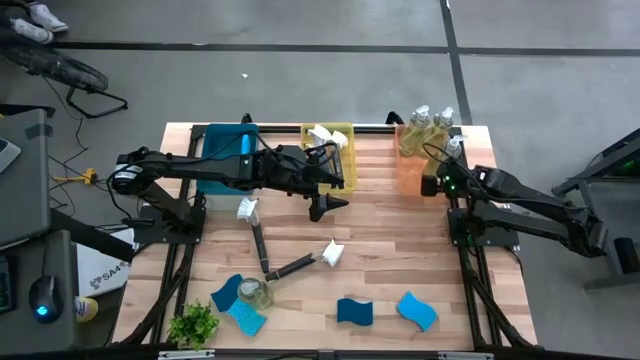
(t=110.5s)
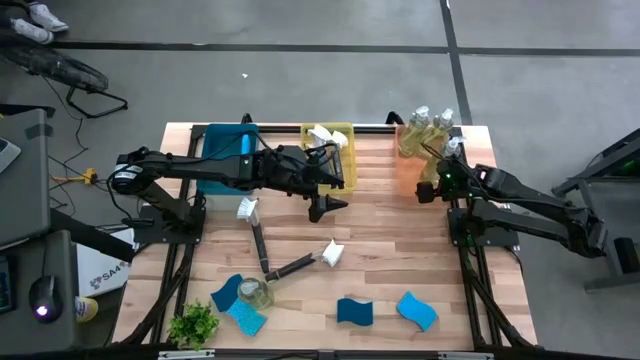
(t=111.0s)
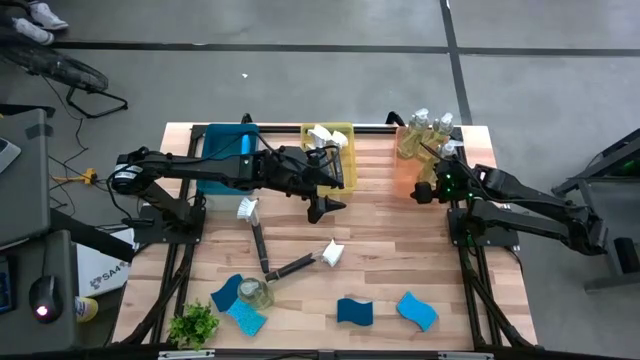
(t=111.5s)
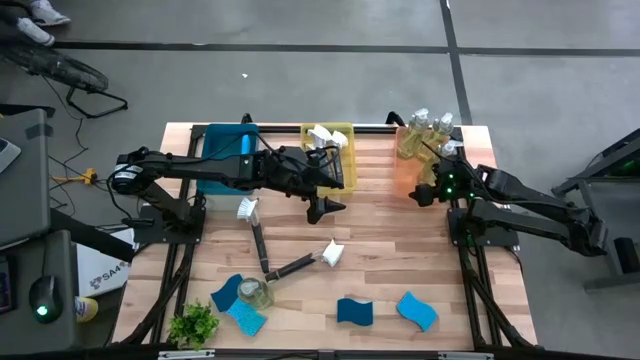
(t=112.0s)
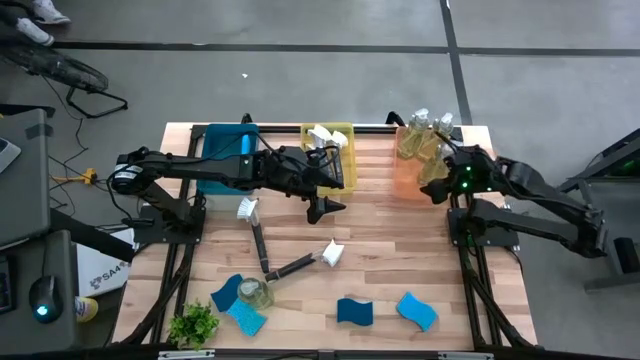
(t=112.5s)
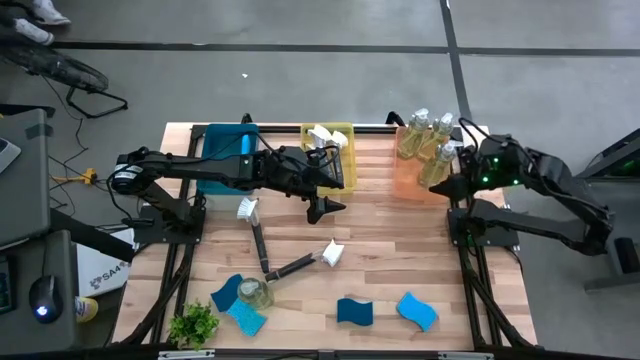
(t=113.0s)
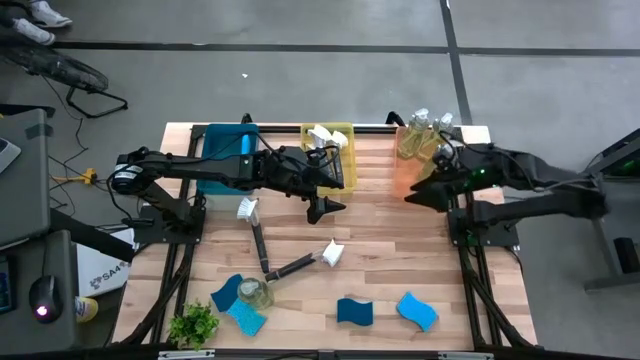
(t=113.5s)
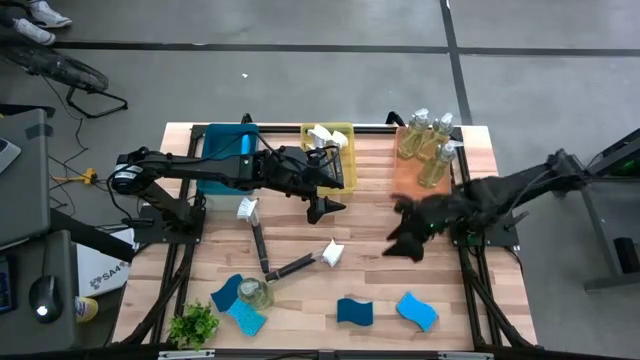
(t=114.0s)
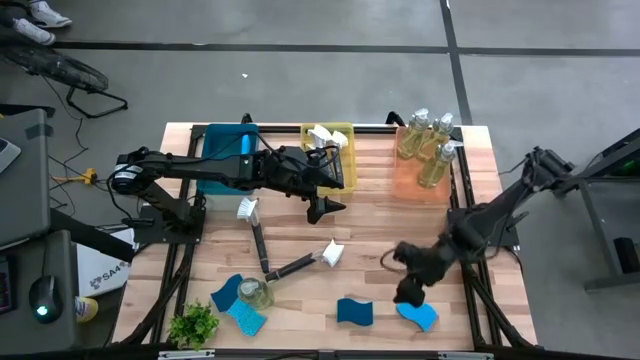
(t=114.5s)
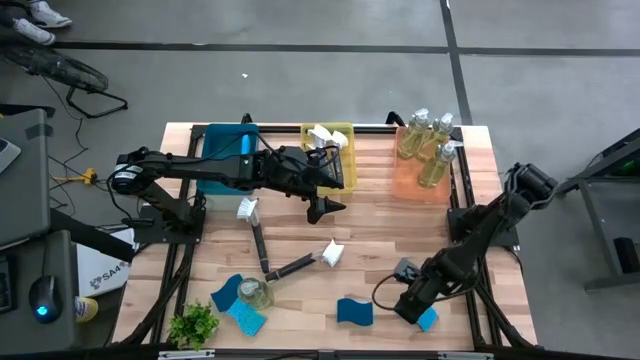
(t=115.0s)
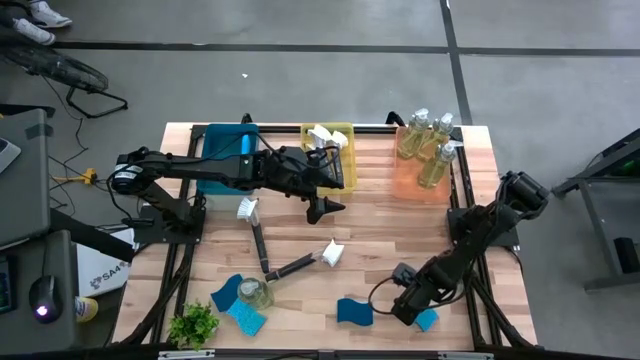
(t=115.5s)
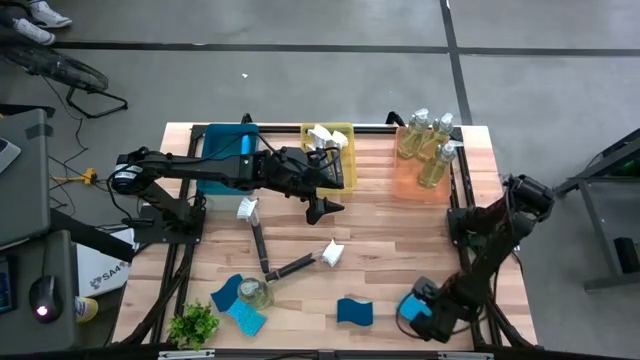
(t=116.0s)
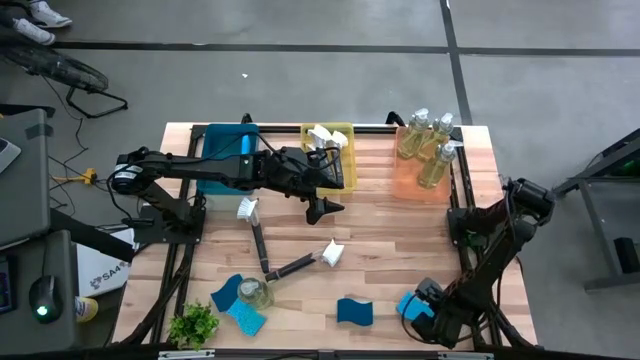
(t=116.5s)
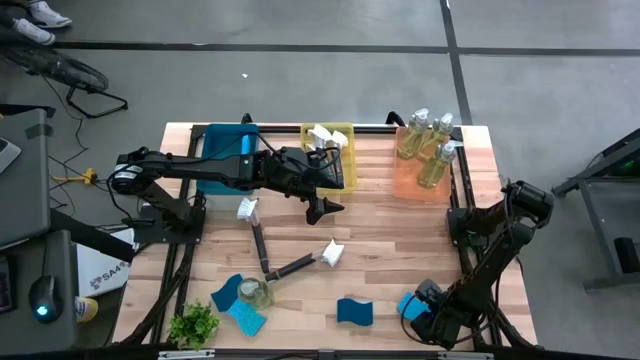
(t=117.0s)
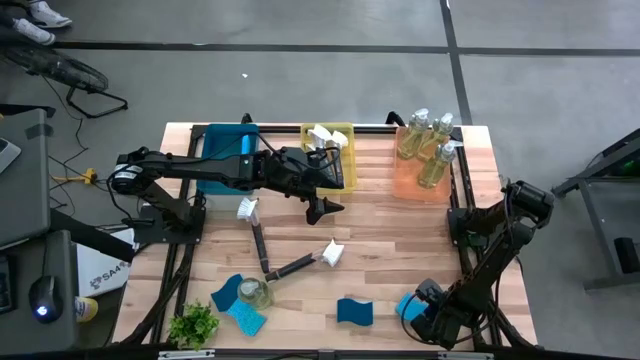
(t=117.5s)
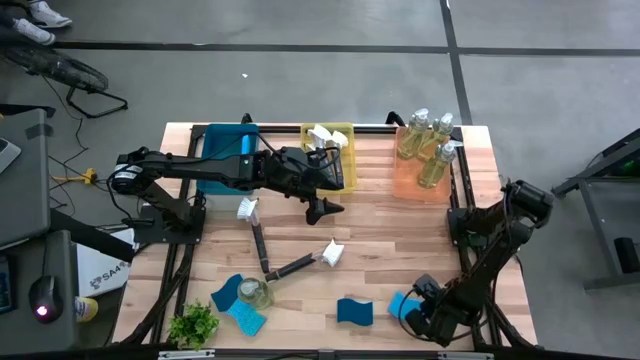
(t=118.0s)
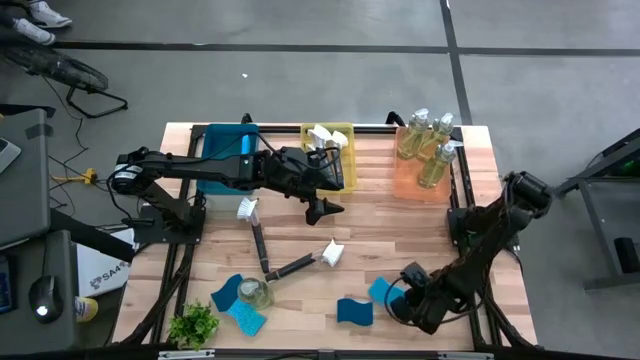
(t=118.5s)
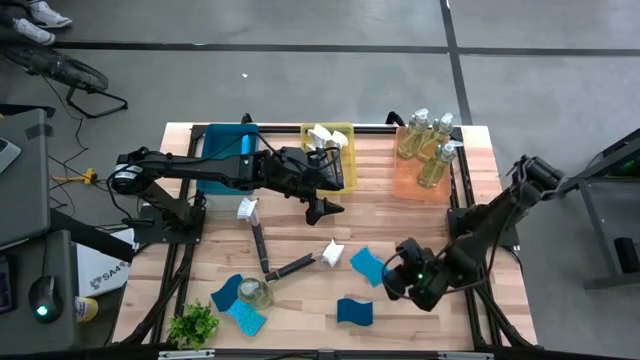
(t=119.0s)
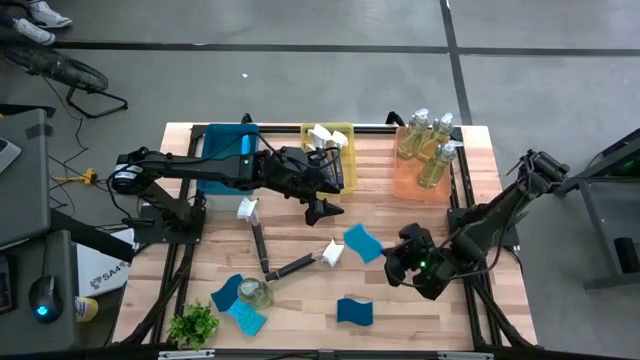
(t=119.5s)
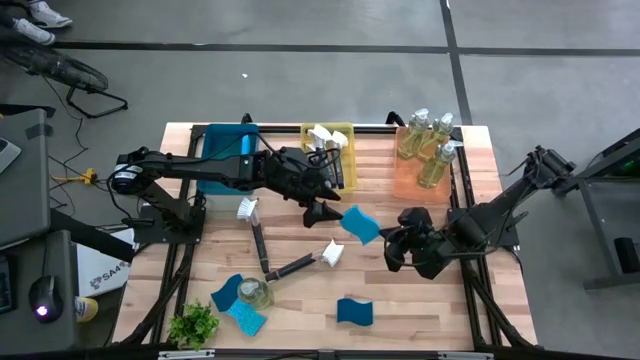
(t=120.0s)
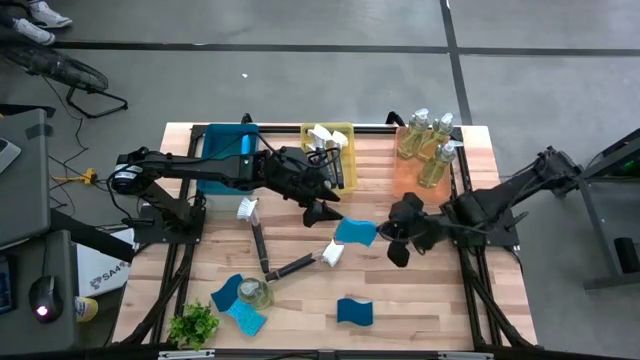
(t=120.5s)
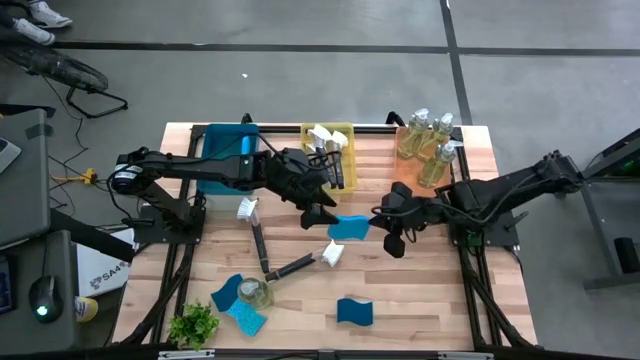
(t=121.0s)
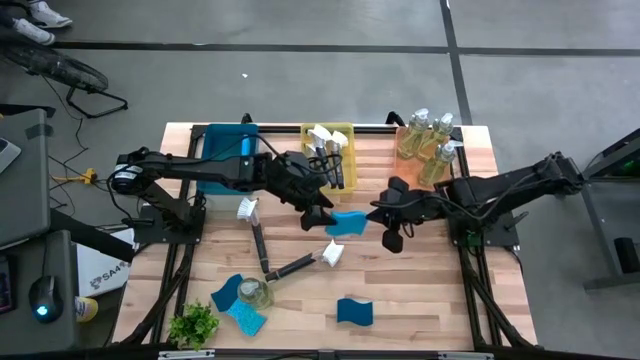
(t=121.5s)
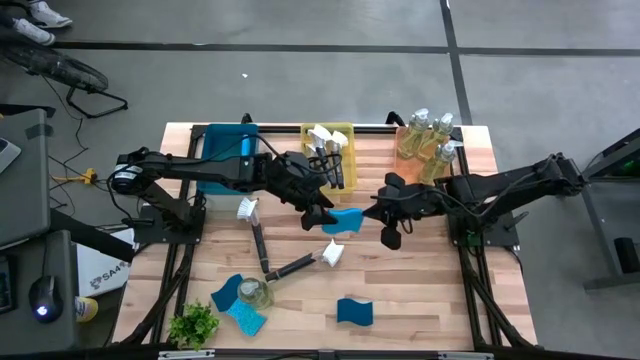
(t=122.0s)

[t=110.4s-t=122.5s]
Task: Pick & Place Kitchen Sink Supplies
Put the blue dishwashing sponge into the blue bin

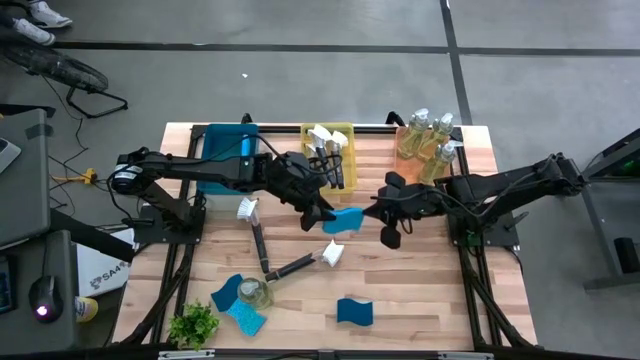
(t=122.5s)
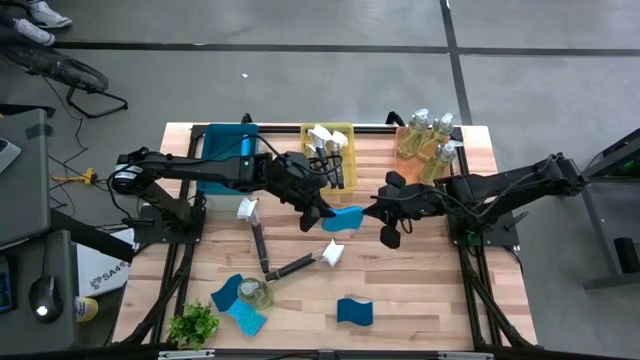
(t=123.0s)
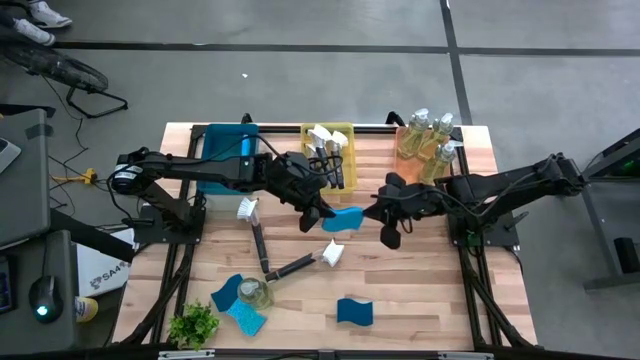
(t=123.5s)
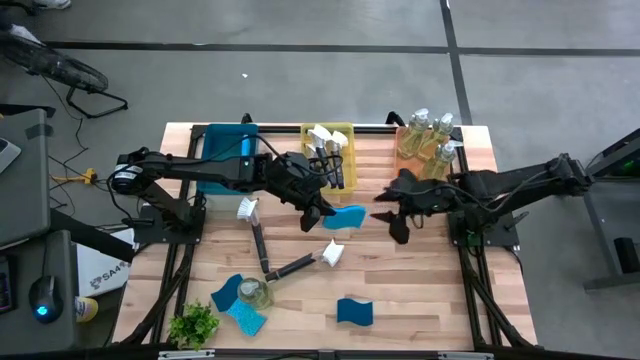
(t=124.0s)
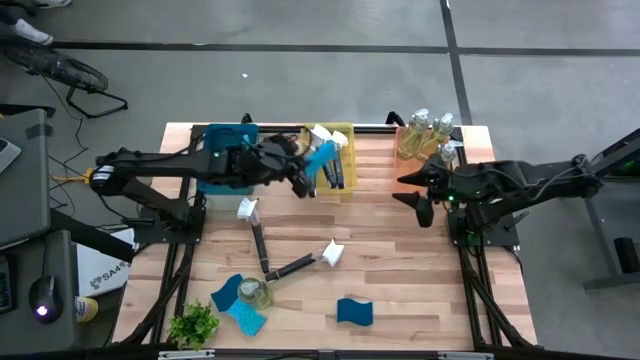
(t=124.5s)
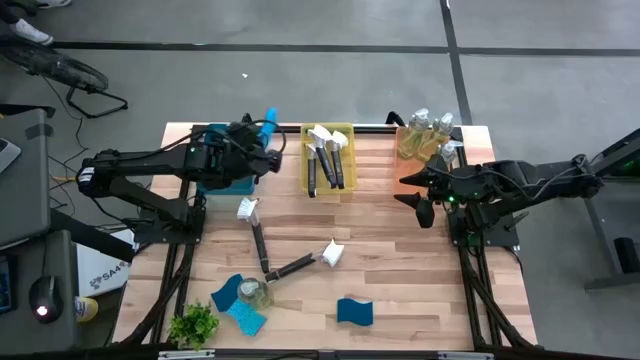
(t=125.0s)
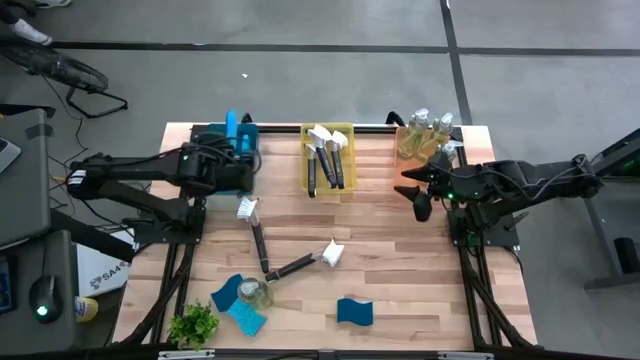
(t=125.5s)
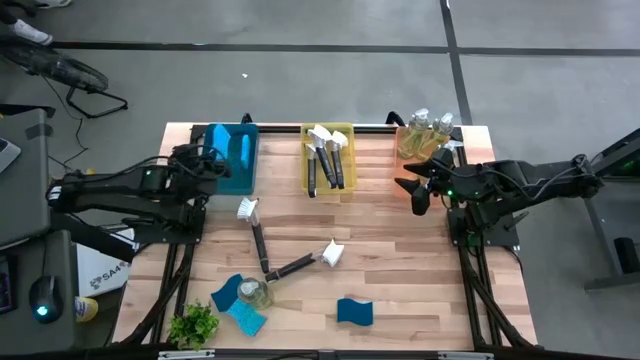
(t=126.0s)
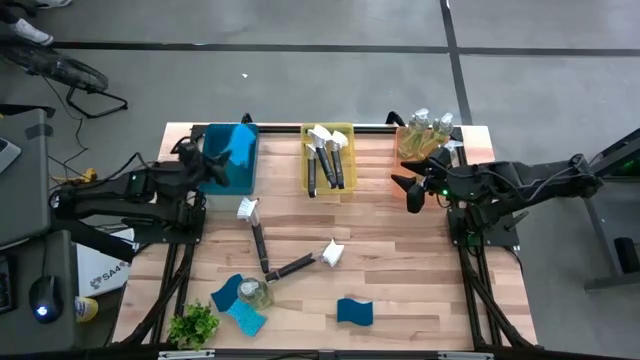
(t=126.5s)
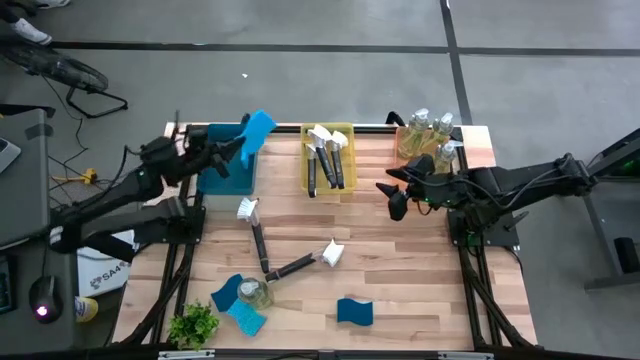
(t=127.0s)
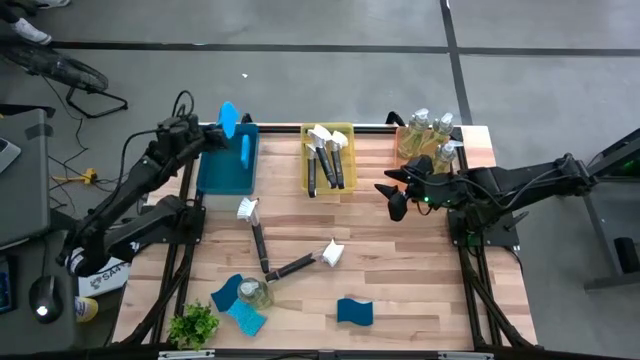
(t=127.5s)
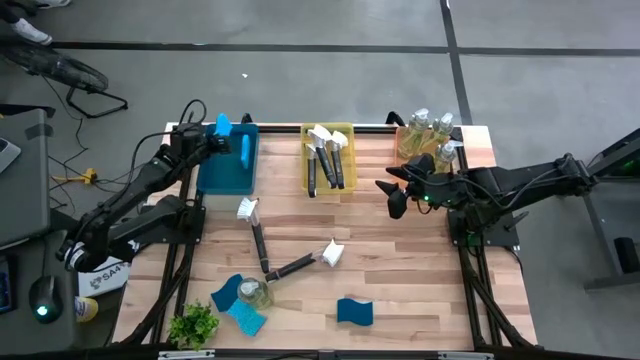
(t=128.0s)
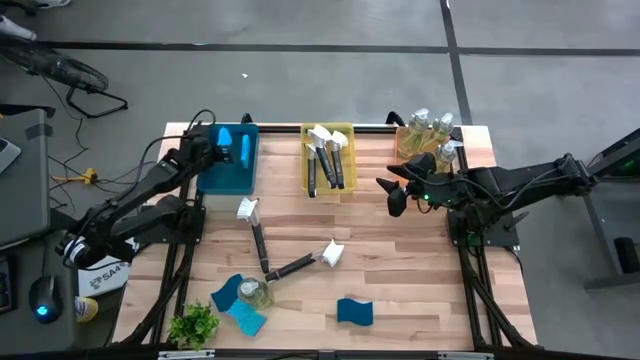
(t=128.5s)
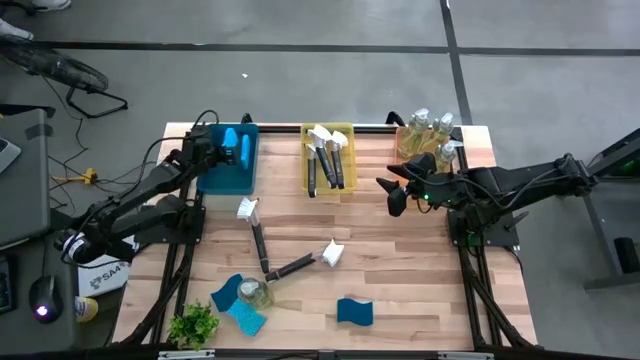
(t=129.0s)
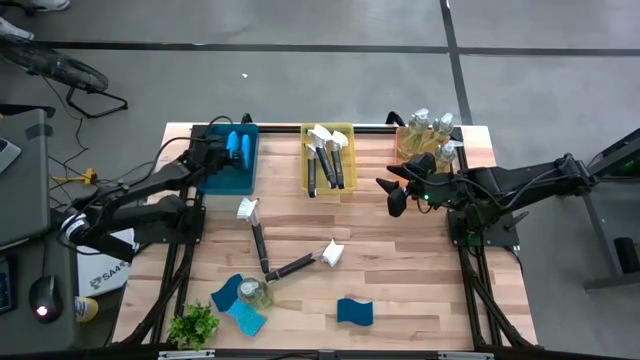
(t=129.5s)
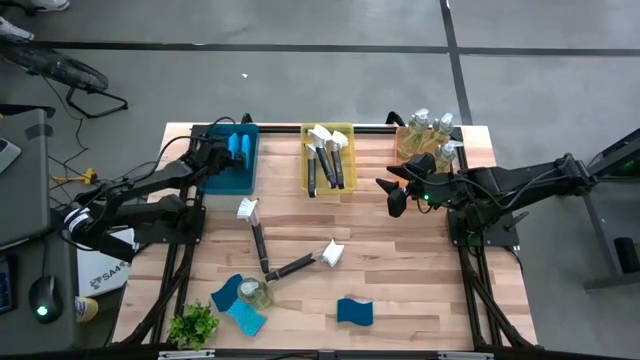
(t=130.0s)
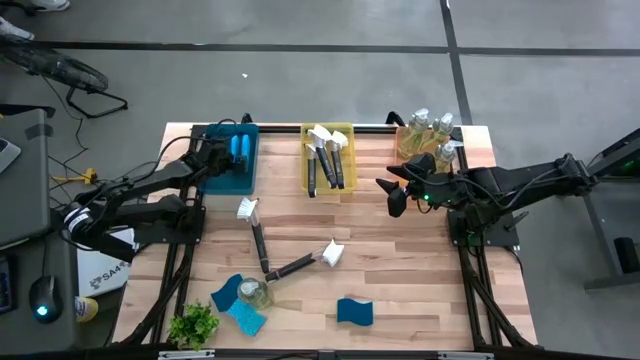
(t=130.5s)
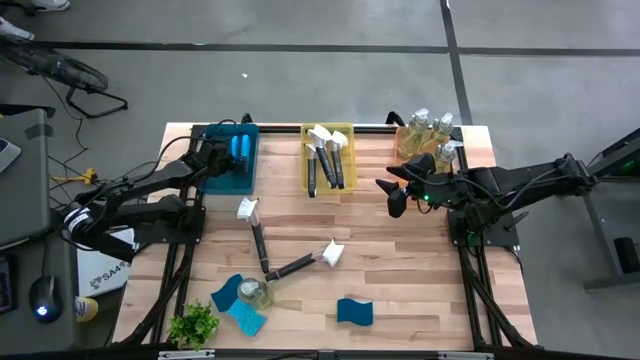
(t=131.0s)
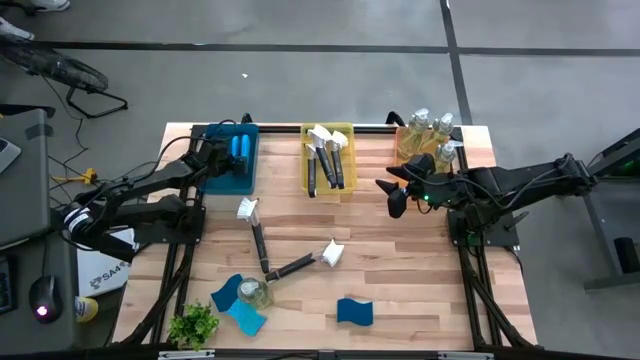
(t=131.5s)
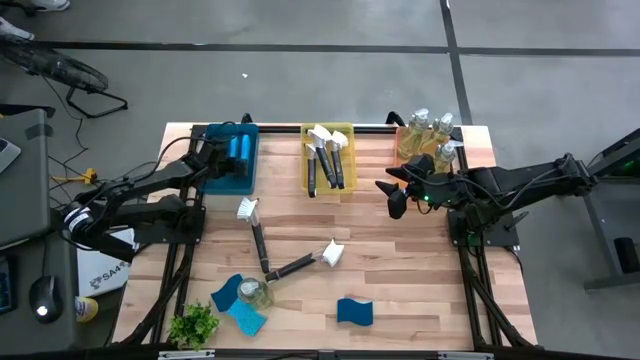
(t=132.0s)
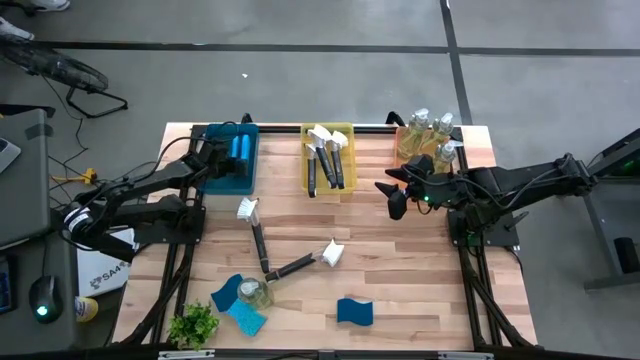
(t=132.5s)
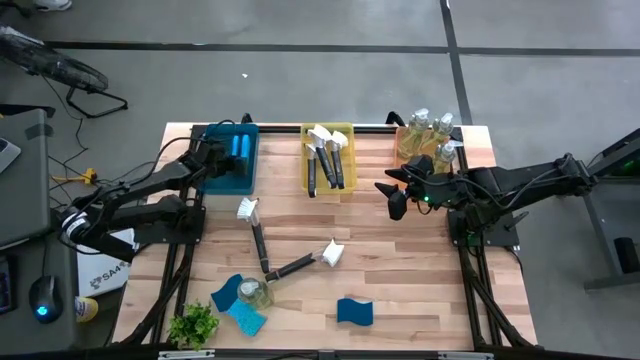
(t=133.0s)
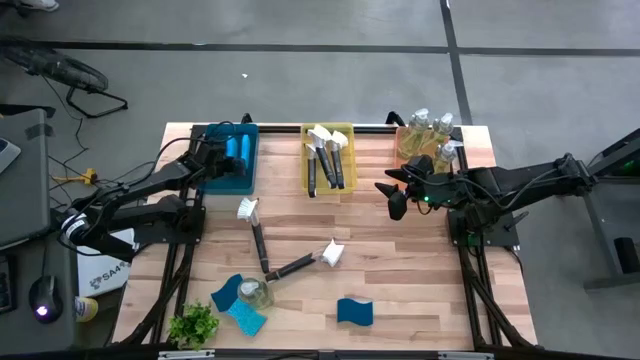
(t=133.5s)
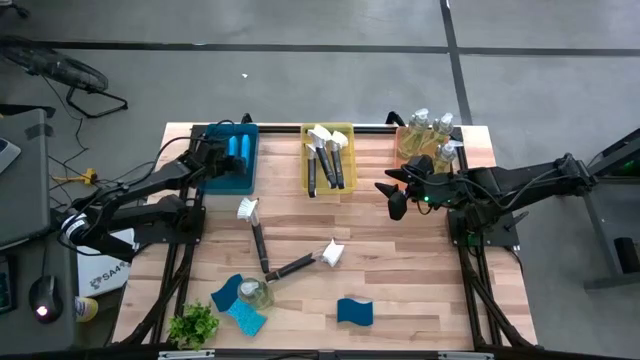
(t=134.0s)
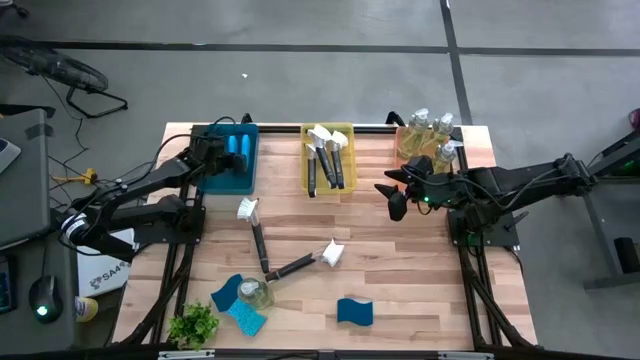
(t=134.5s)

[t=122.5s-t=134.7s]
Put the blue dishwashing sponge into the blue bin
